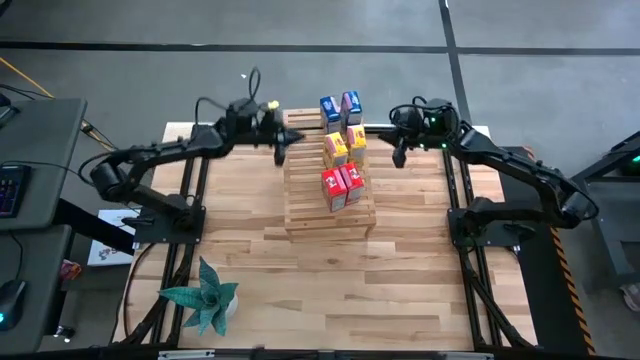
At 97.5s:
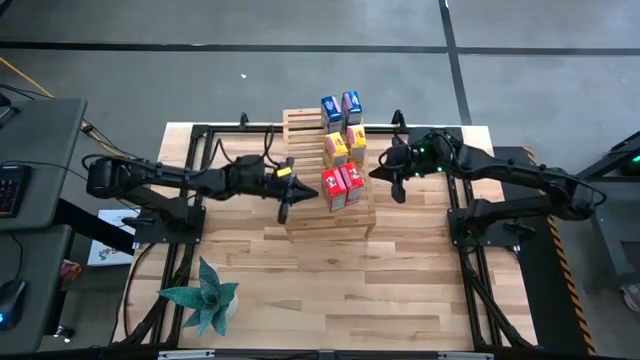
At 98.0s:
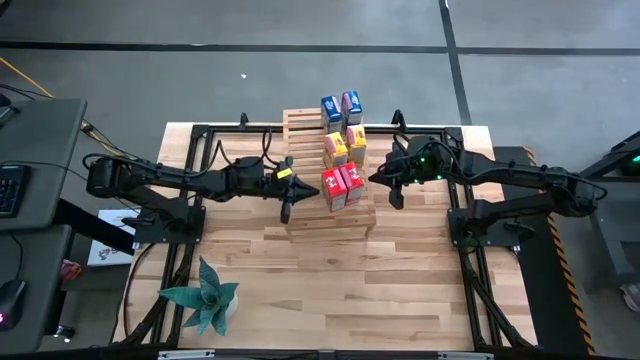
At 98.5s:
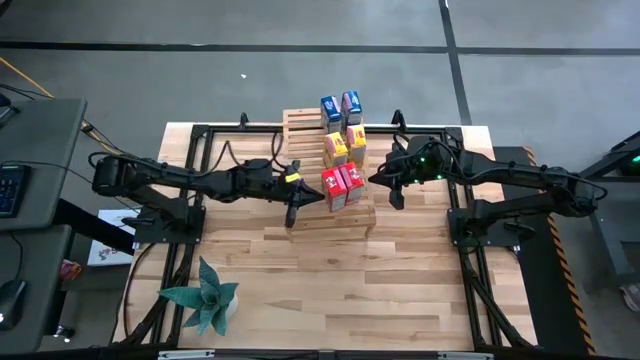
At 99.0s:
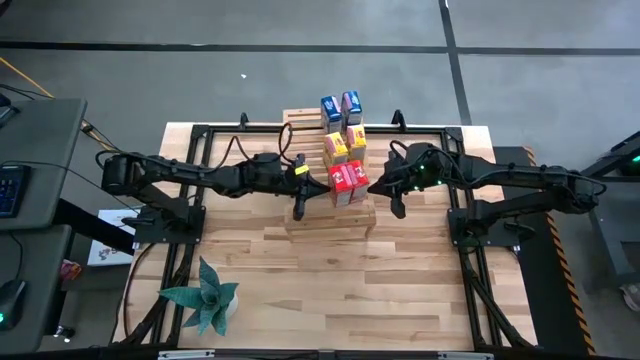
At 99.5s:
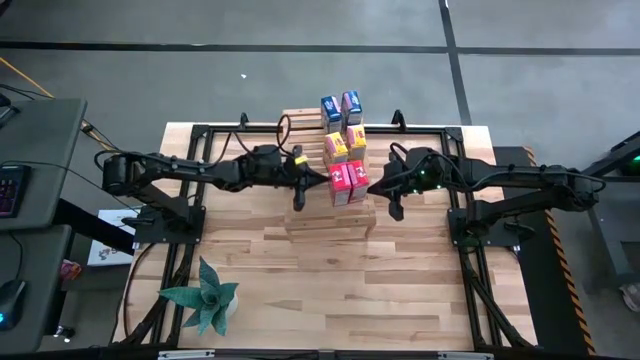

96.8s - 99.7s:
Task: Stack cereal on shelf
Adjust the red cereal boxes on the shelf

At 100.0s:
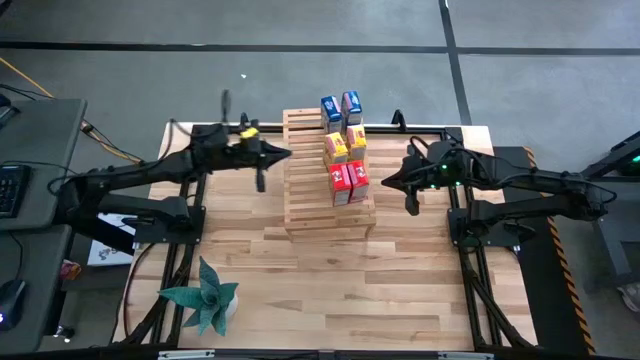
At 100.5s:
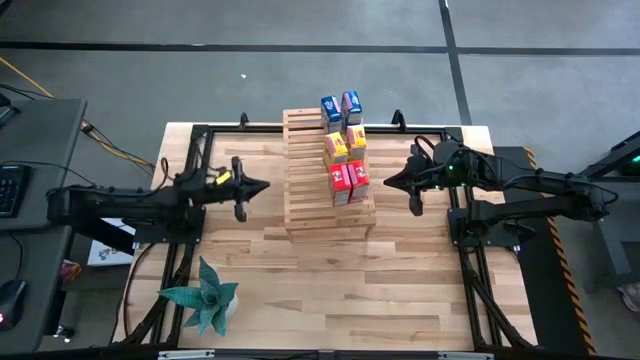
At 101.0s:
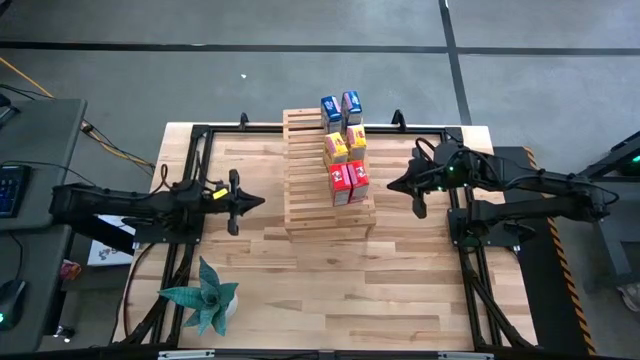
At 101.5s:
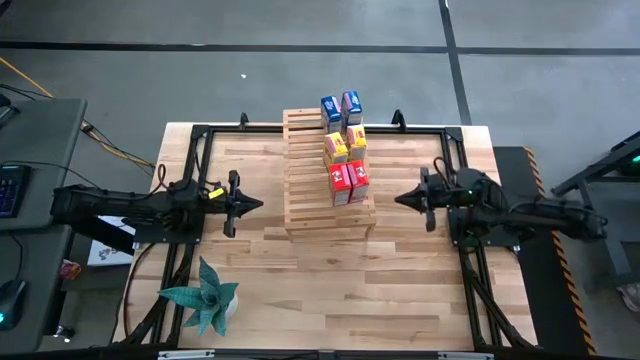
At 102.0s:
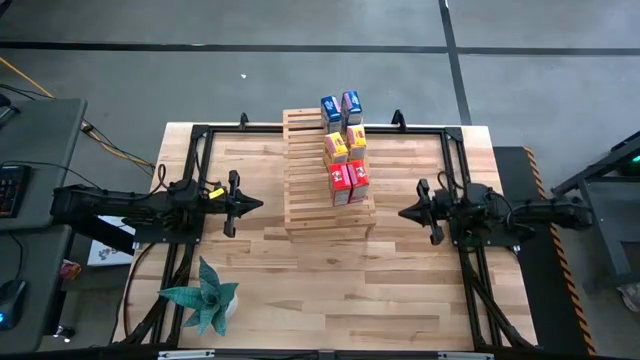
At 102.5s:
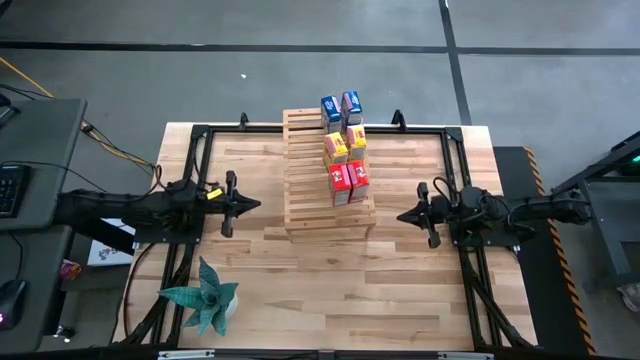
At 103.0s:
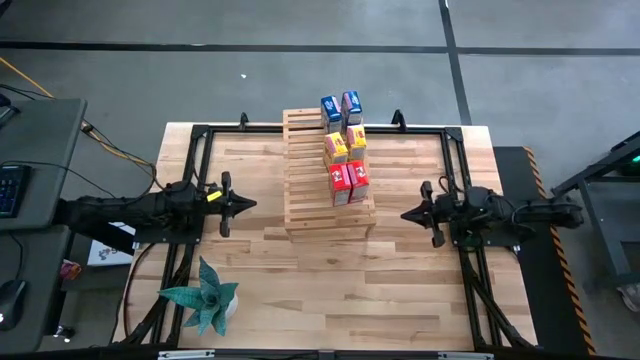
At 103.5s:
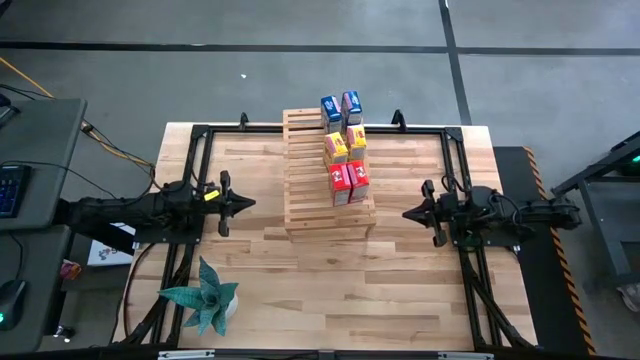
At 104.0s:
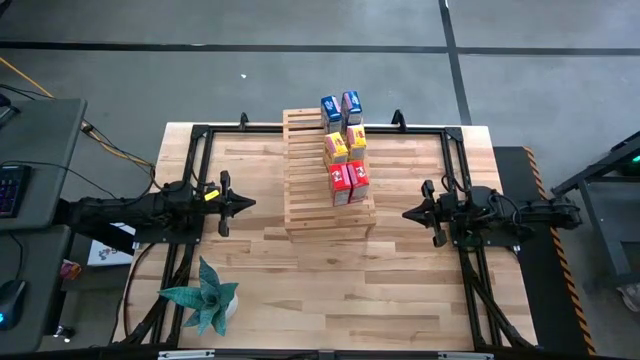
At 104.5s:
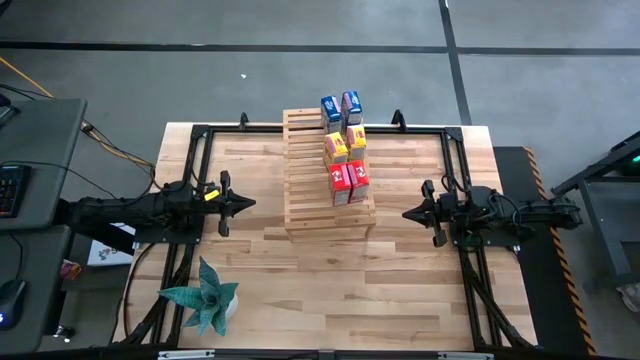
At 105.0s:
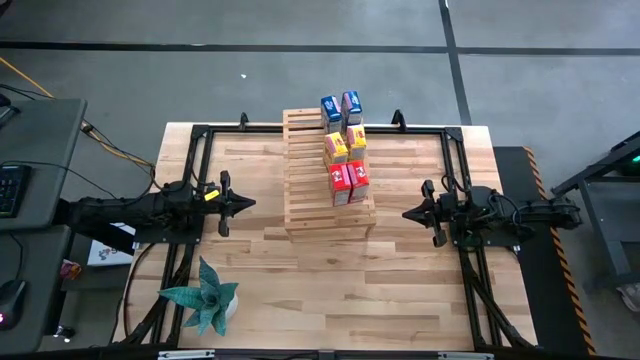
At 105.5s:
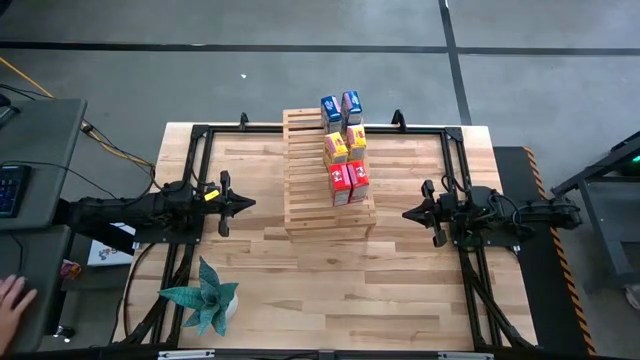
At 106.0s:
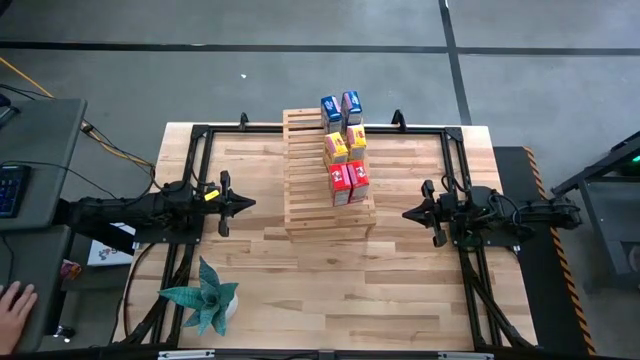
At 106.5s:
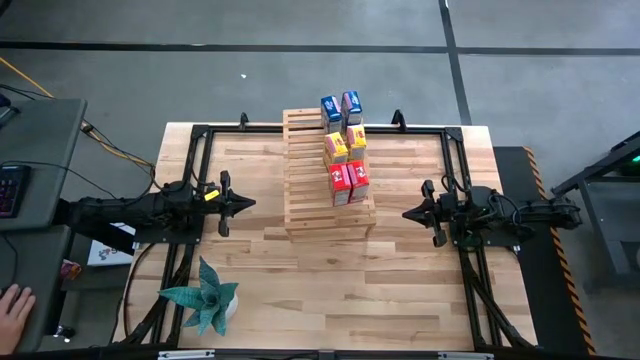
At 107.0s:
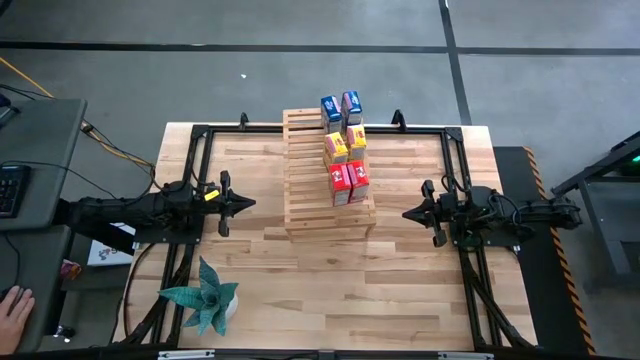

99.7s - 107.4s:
Return to Home Position

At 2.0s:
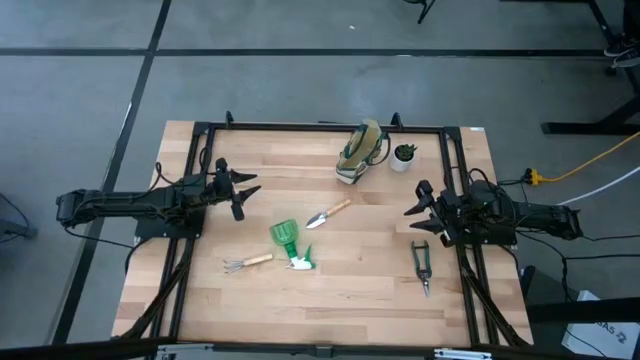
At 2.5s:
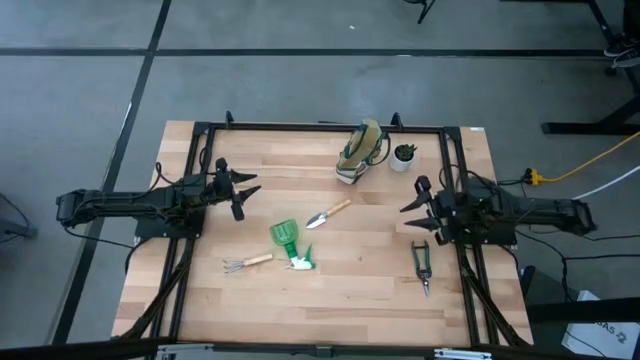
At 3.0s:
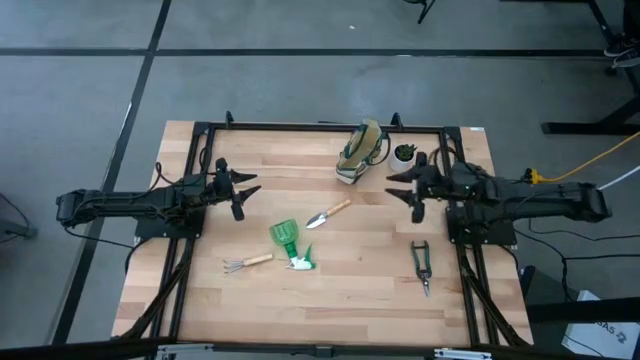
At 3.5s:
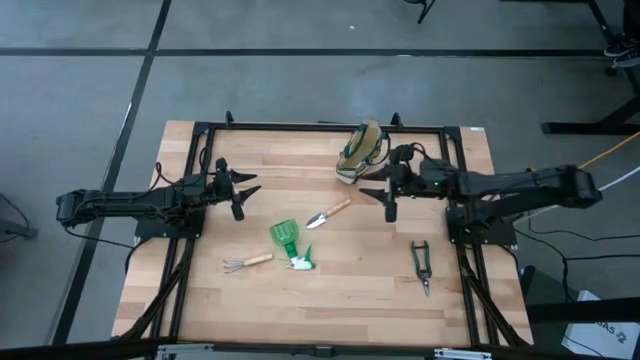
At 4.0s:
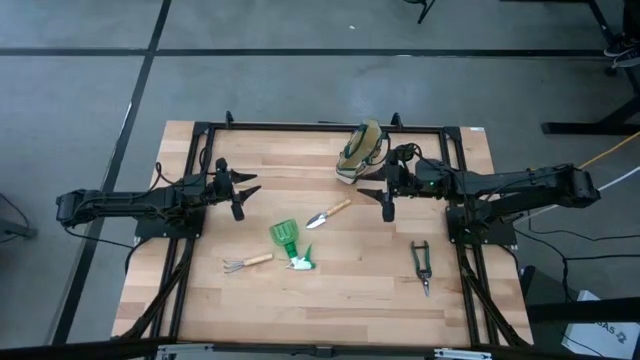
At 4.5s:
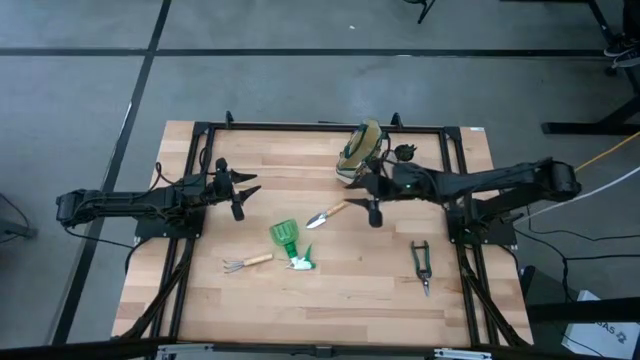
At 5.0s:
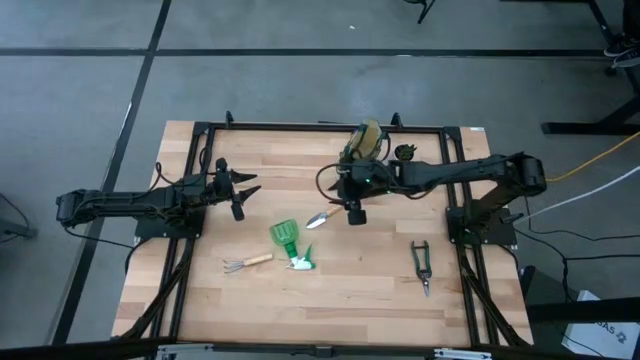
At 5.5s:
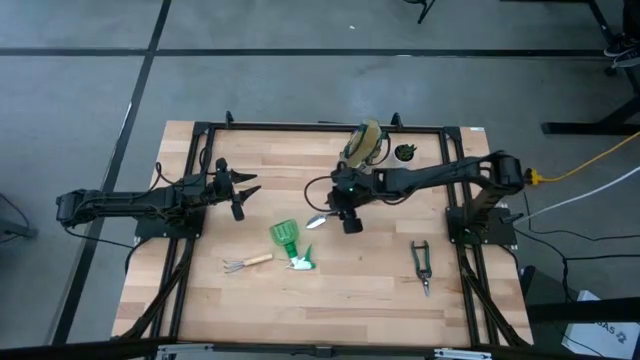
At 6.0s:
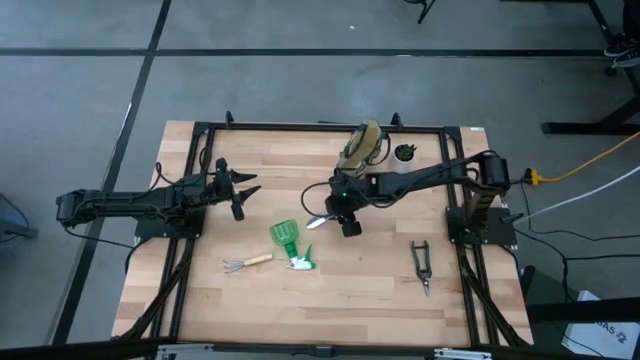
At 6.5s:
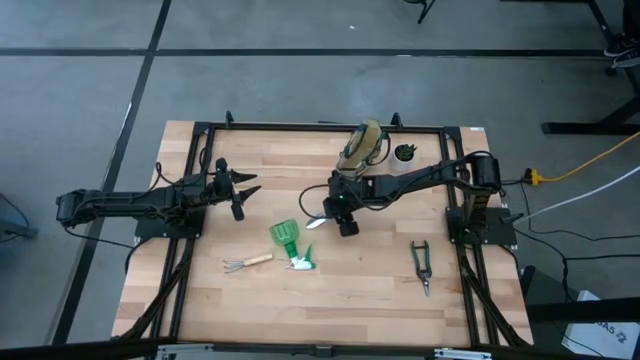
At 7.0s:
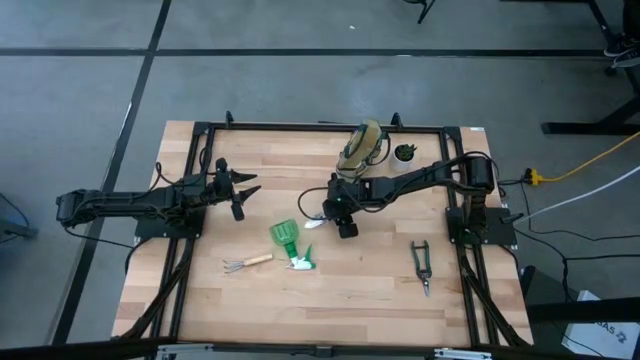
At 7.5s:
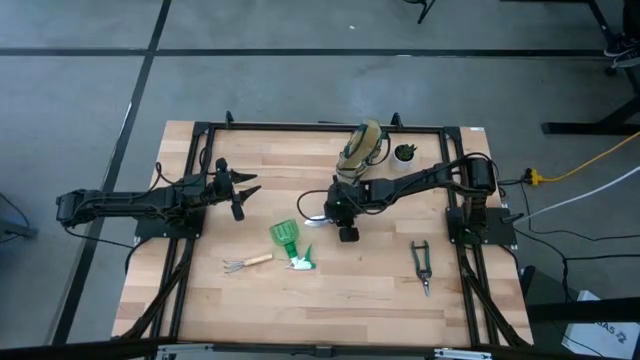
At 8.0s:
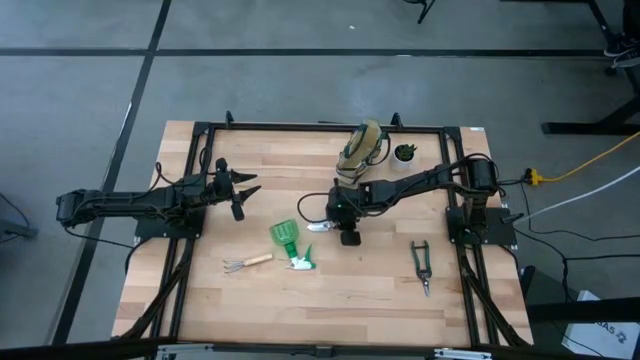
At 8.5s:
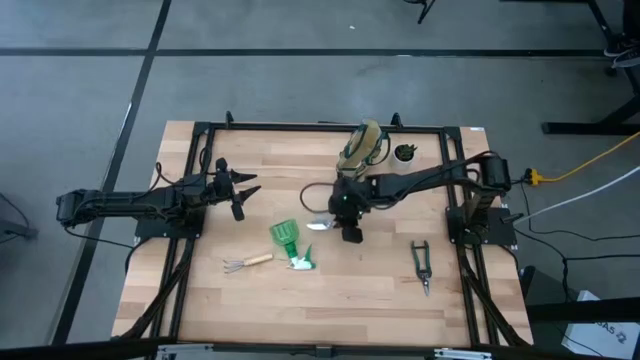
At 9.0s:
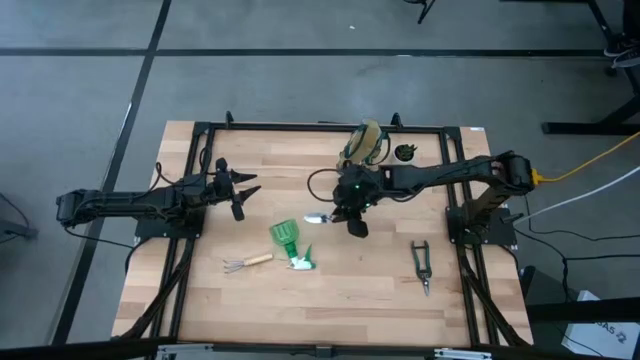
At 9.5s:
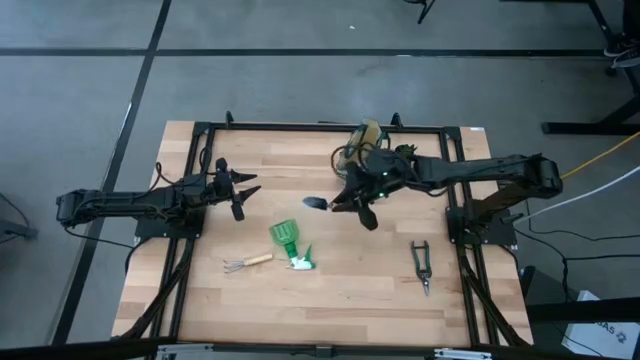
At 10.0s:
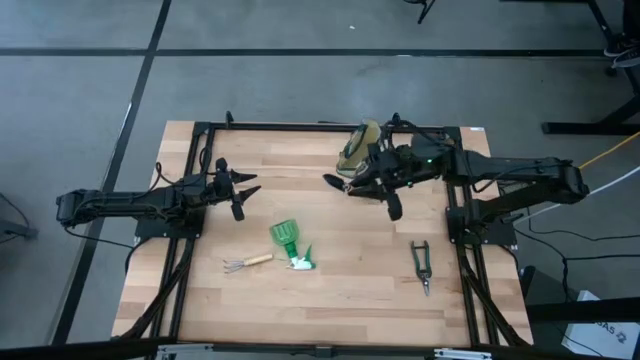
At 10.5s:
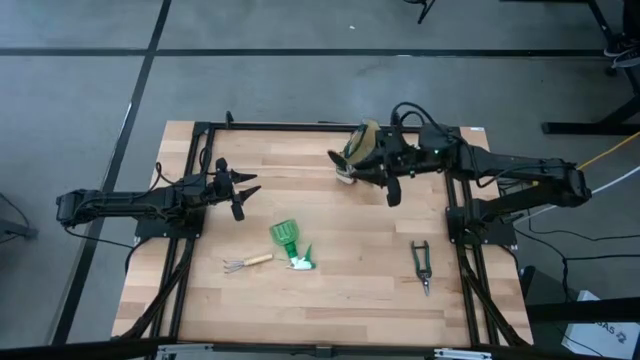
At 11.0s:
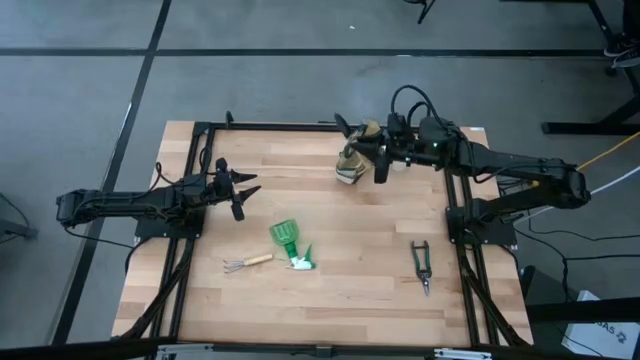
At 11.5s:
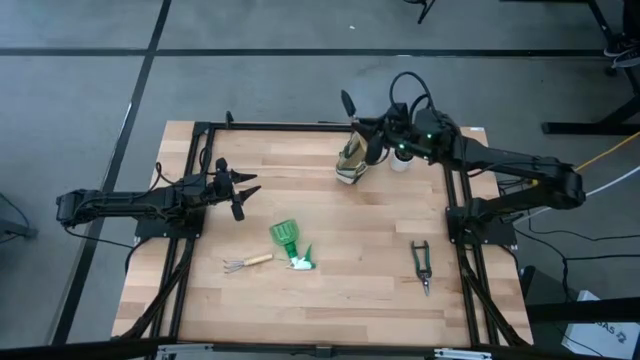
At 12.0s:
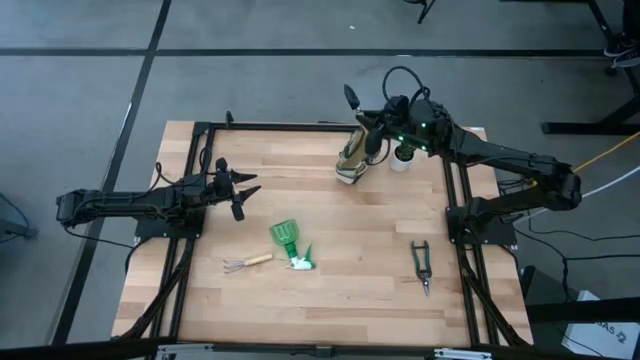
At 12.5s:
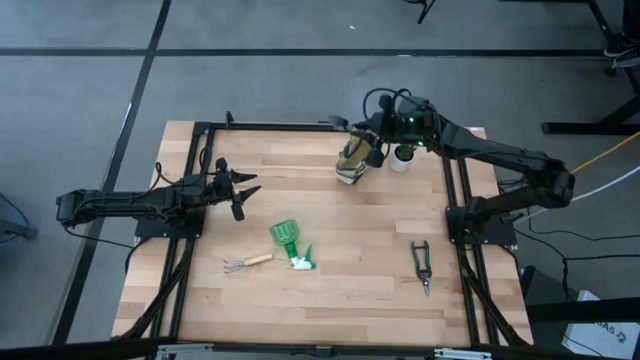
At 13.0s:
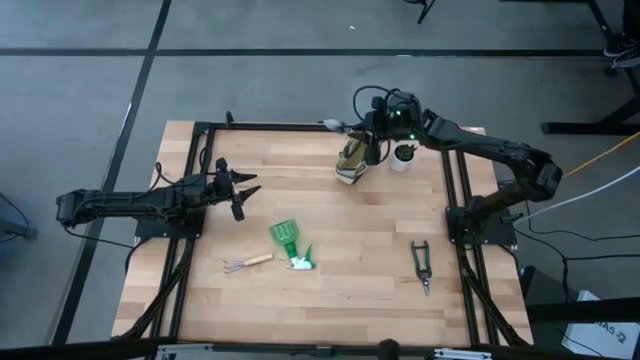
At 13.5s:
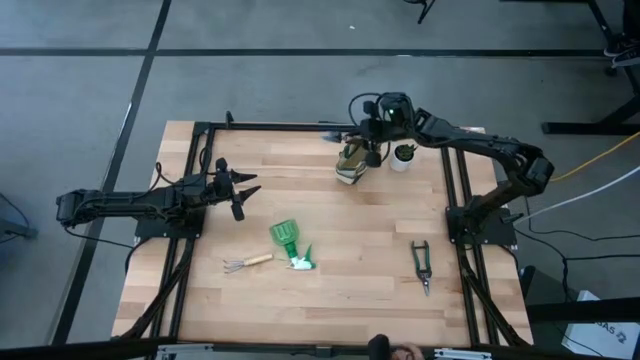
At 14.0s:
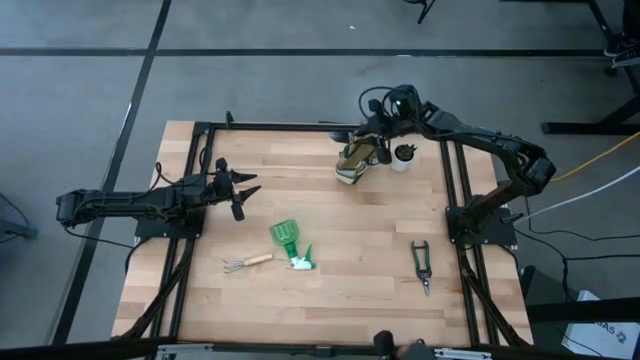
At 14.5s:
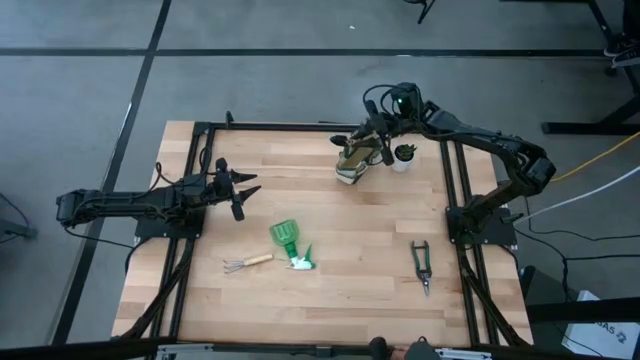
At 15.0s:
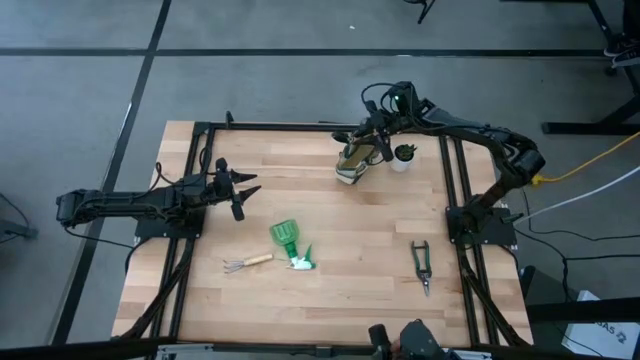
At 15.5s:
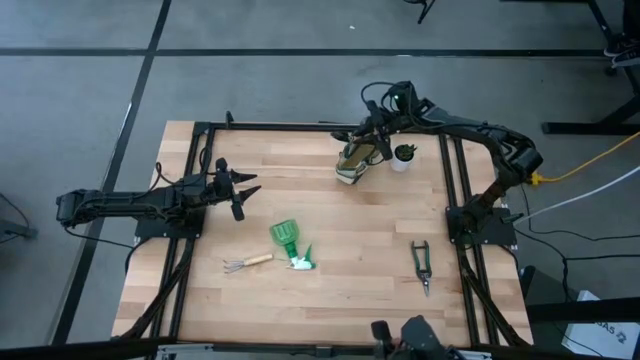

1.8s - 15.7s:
Task: Pick & Place Garden tools in Gardening bag
Put the brown trowel into the brown gardening bag
